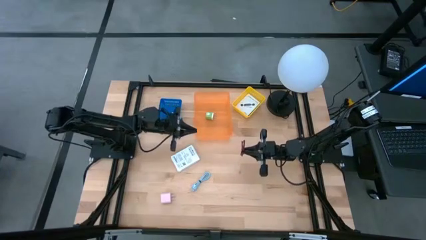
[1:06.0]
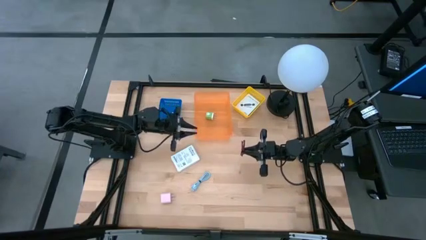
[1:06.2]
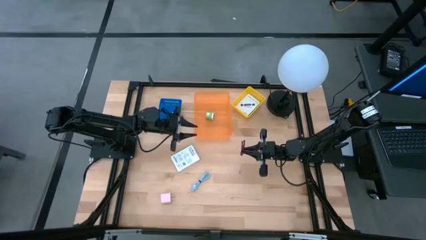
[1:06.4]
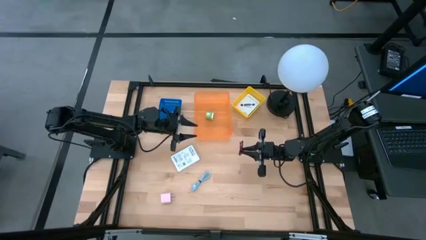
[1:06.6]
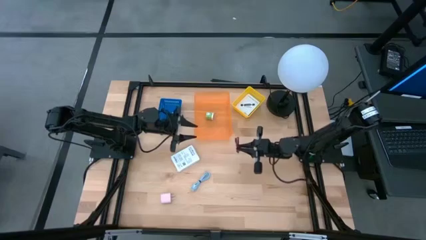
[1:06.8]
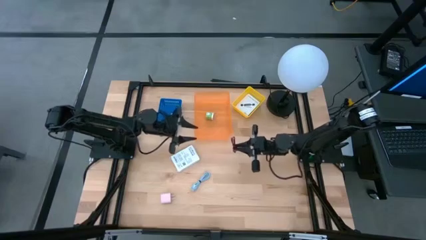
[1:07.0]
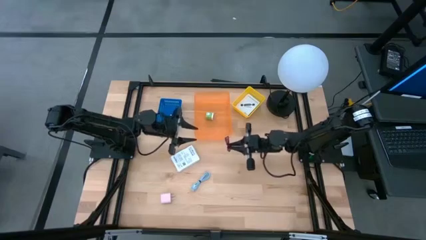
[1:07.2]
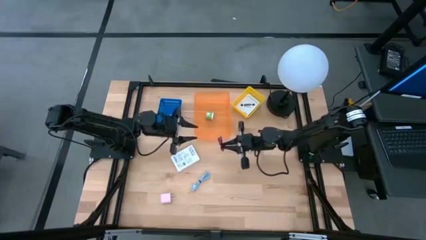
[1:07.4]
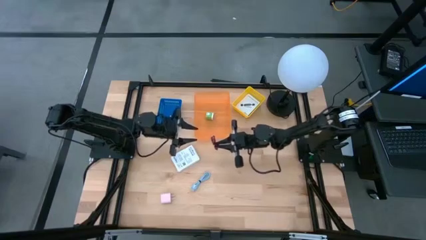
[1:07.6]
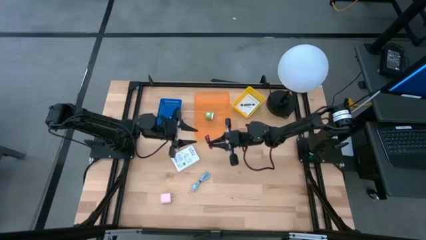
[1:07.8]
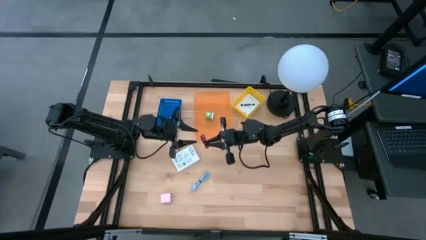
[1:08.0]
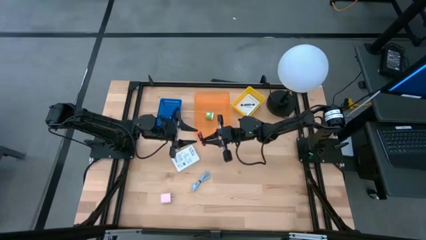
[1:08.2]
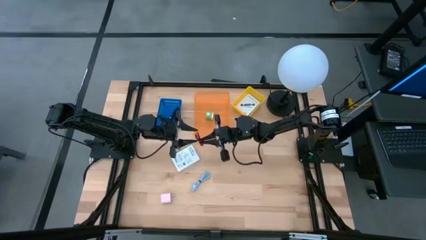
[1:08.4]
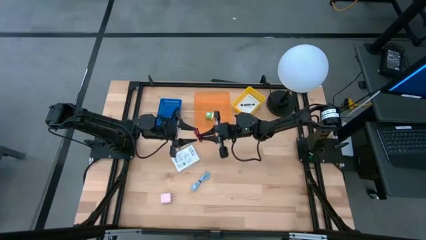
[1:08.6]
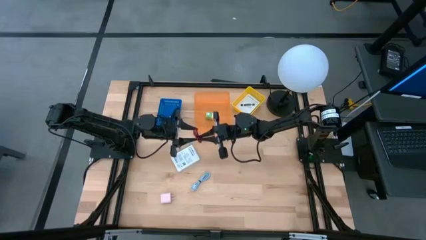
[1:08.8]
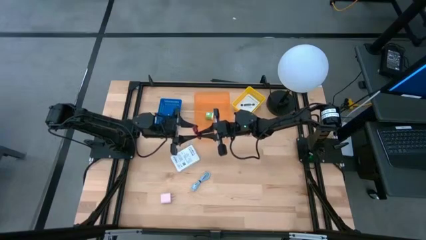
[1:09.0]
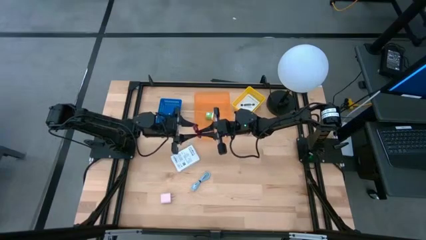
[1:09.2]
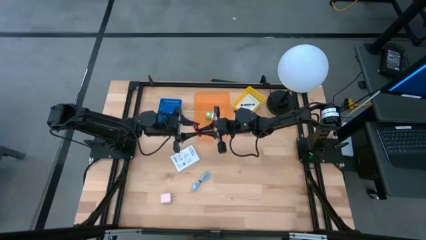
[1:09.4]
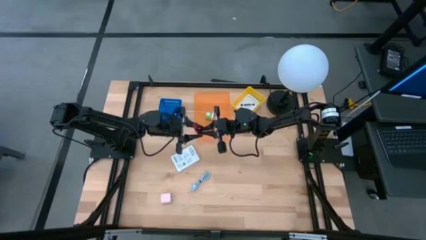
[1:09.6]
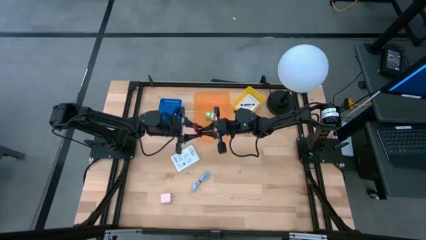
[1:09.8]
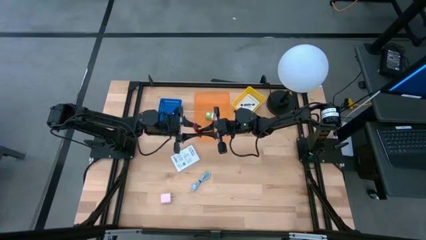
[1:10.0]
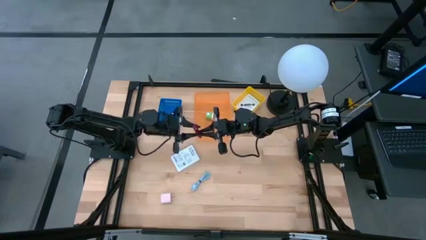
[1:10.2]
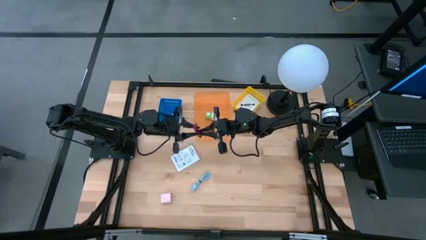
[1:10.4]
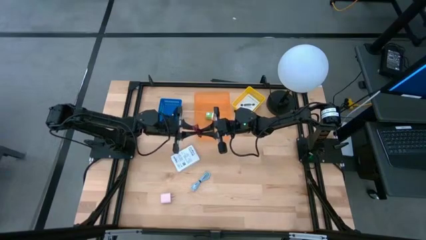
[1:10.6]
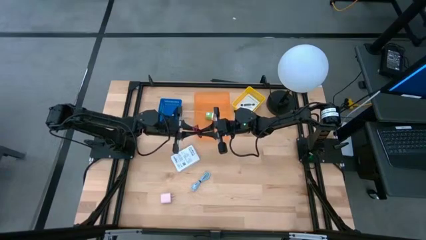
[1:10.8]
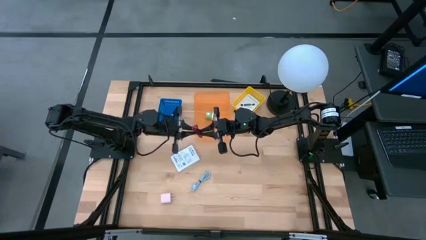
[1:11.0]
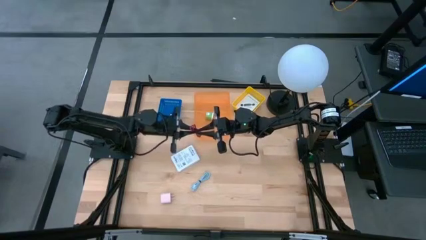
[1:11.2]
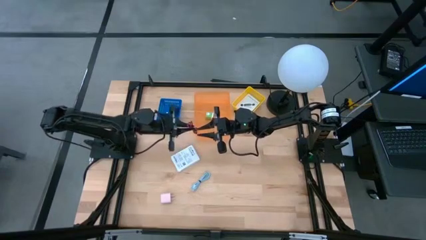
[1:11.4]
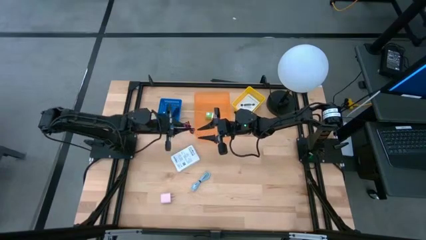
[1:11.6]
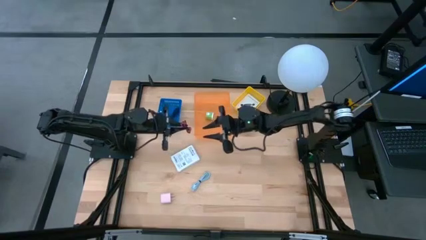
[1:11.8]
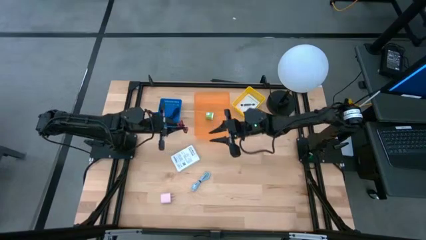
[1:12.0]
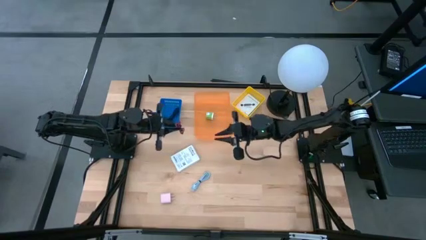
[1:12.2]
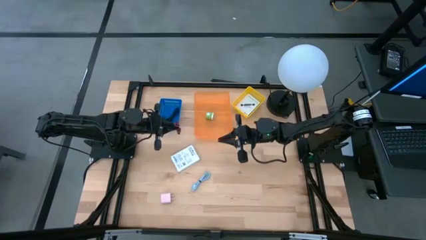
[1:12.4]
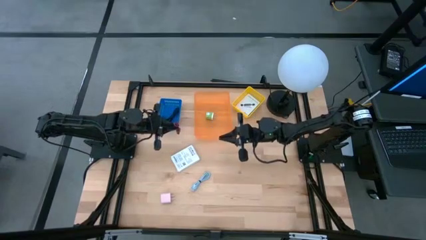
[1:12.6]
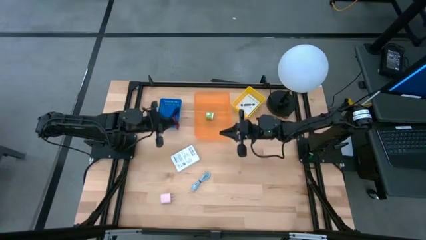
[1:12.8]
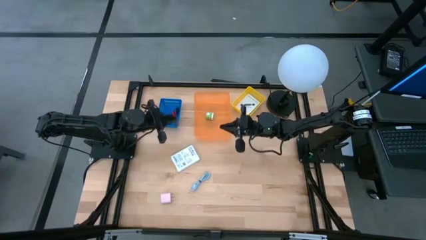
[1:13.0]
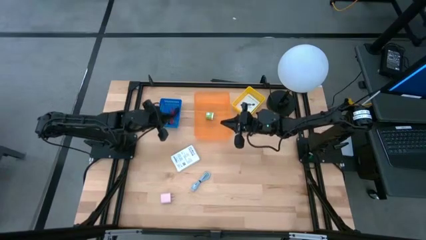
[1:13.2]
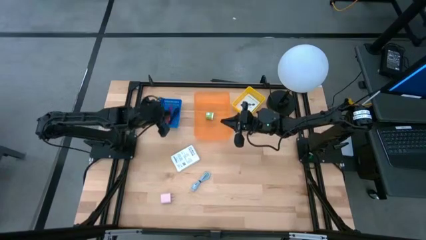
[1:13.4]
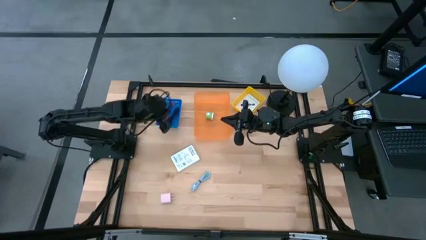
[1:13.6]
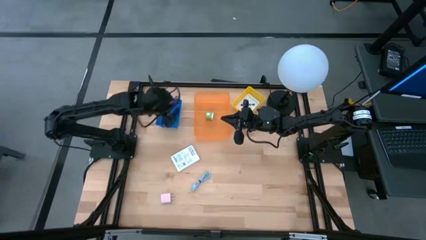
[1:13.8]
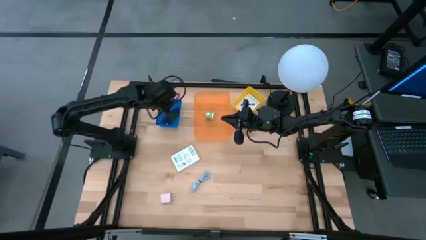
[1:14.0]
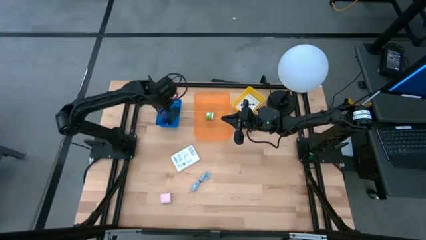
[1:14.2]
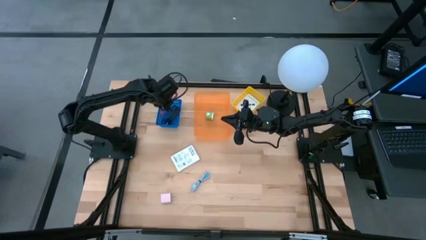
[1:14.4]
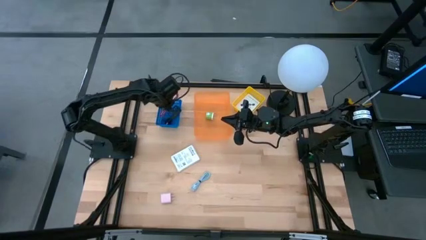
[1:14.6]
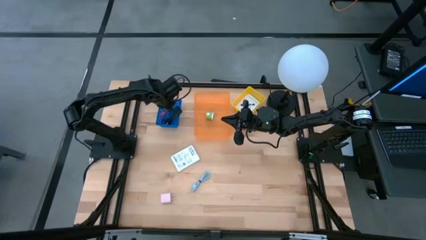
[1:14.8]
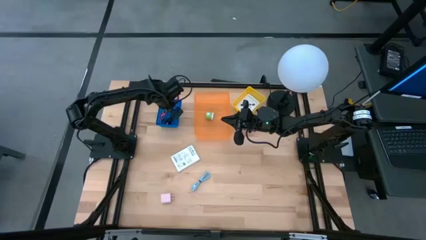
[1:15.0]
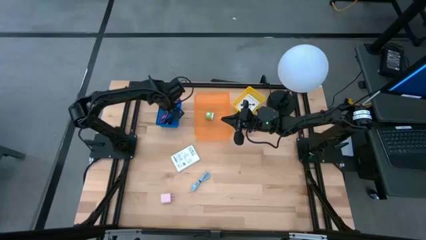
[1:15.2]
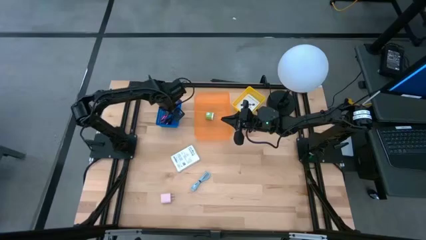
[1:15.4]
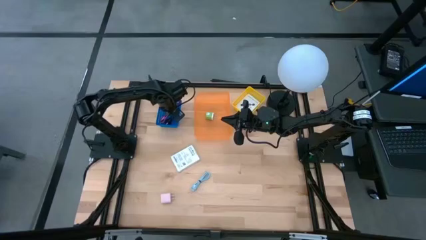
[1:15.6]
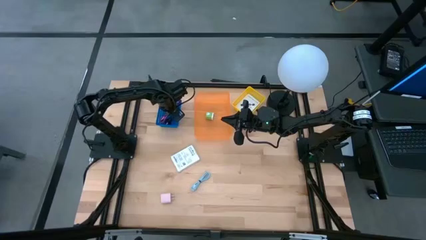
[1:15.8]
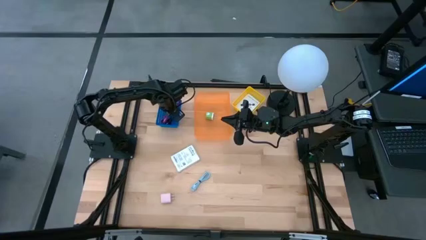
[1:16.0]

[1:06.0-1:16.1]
Task: Pick and place items into bin
Put the pink USB cable wire into the blue basket
